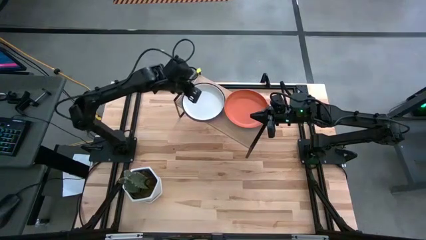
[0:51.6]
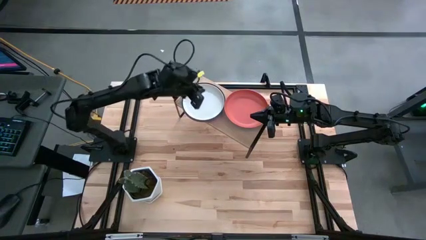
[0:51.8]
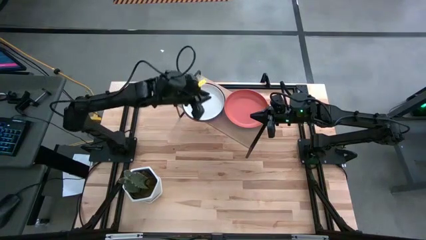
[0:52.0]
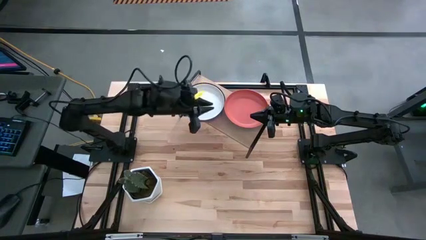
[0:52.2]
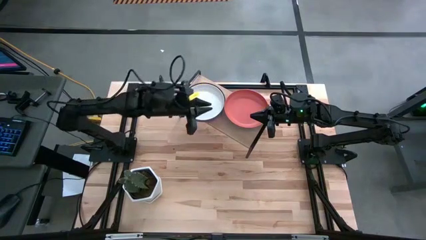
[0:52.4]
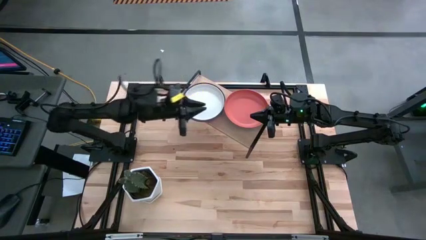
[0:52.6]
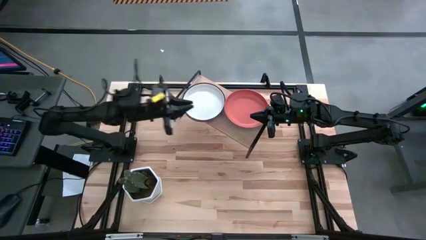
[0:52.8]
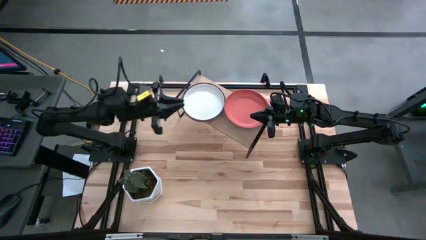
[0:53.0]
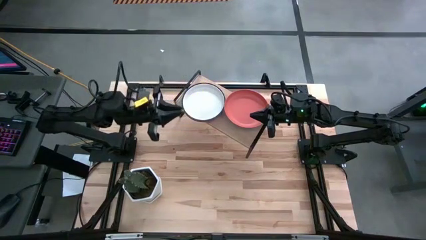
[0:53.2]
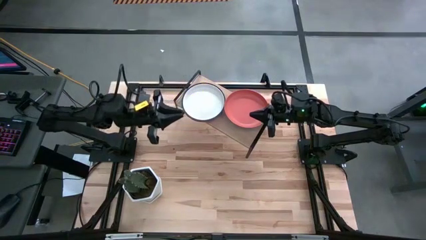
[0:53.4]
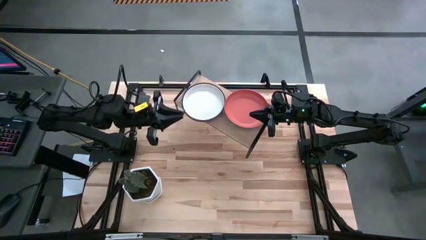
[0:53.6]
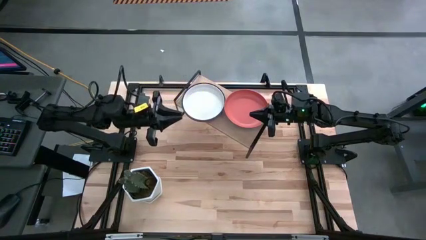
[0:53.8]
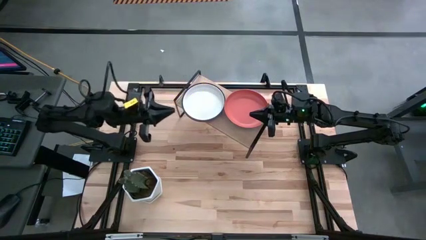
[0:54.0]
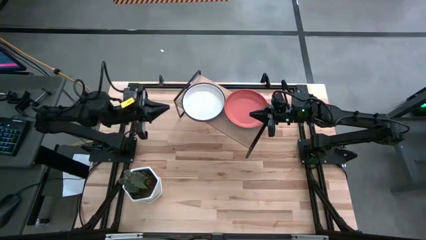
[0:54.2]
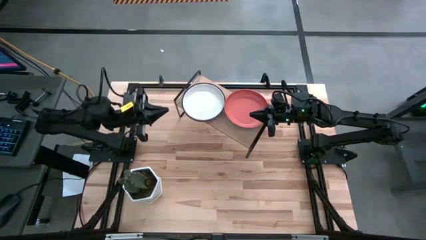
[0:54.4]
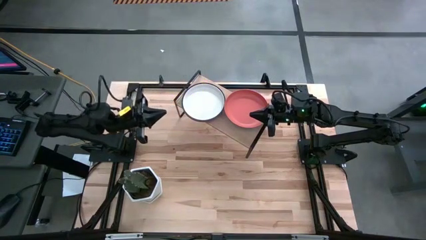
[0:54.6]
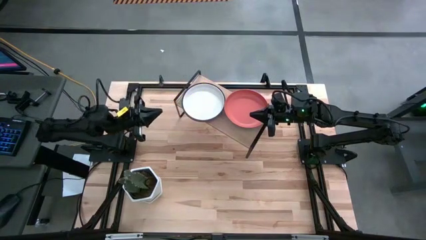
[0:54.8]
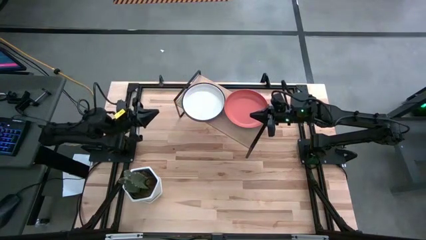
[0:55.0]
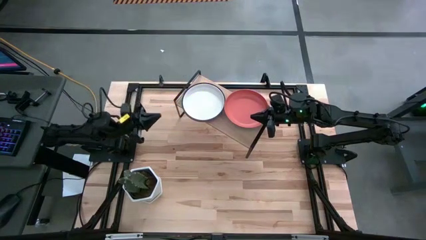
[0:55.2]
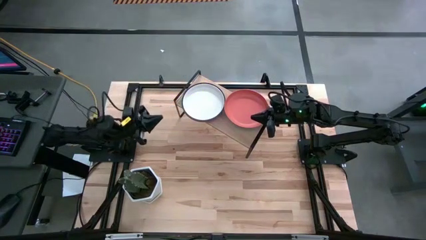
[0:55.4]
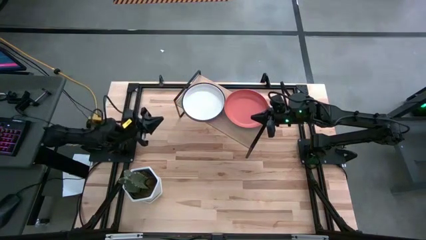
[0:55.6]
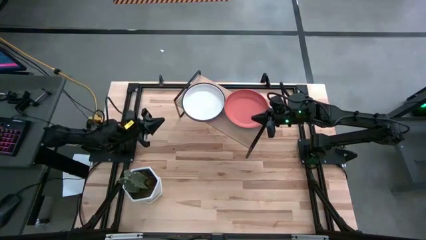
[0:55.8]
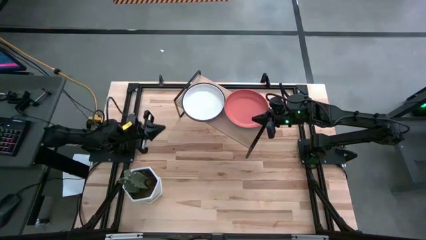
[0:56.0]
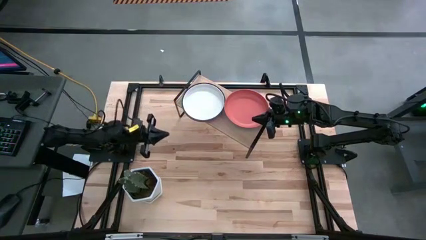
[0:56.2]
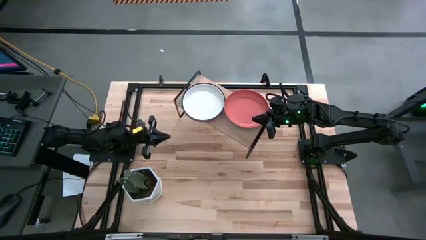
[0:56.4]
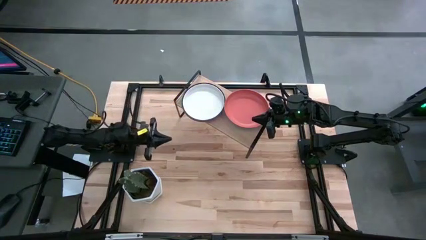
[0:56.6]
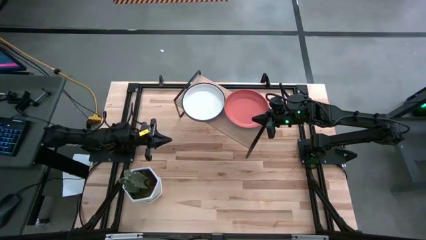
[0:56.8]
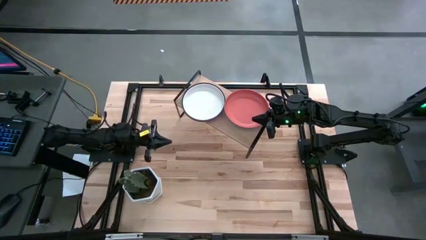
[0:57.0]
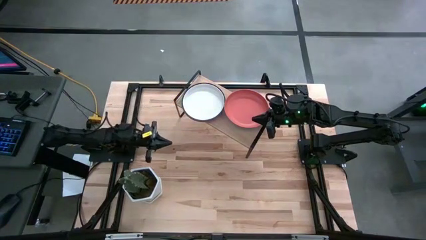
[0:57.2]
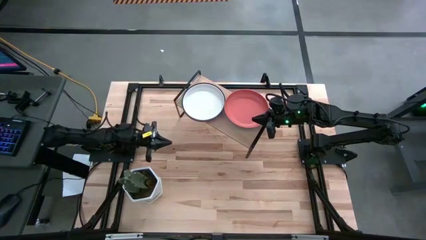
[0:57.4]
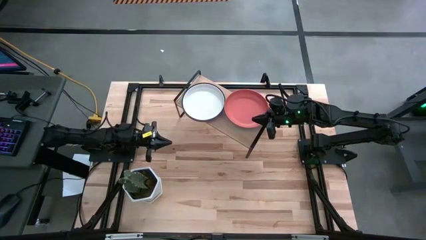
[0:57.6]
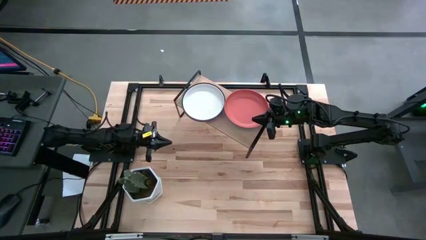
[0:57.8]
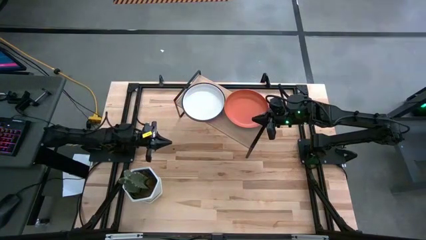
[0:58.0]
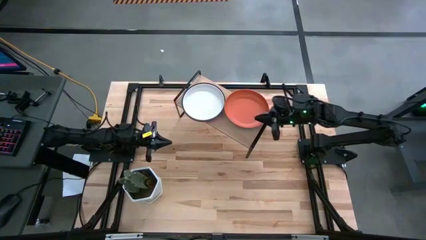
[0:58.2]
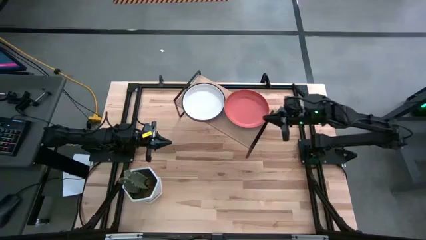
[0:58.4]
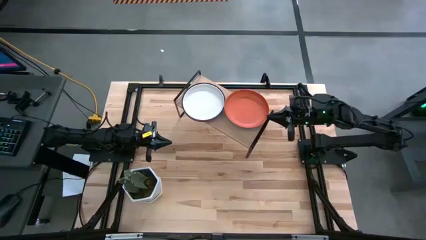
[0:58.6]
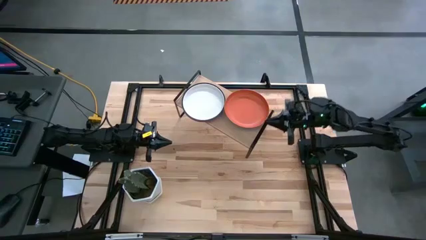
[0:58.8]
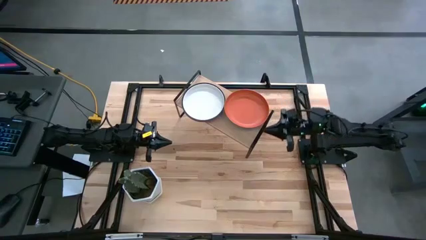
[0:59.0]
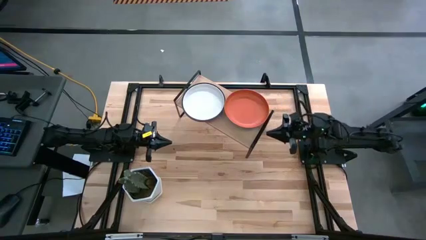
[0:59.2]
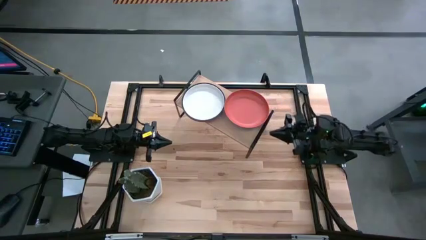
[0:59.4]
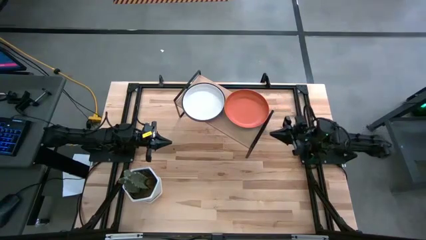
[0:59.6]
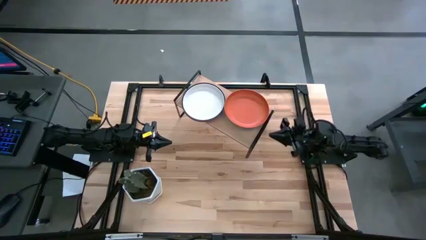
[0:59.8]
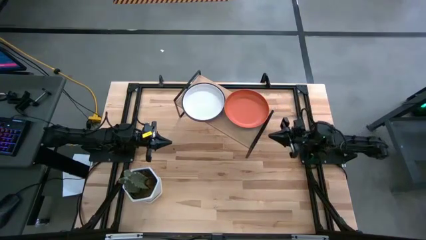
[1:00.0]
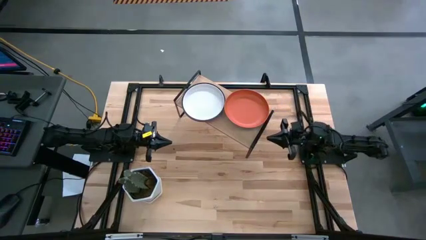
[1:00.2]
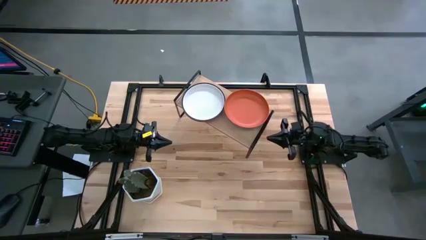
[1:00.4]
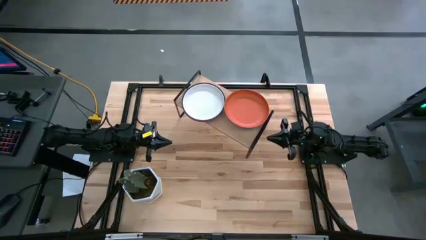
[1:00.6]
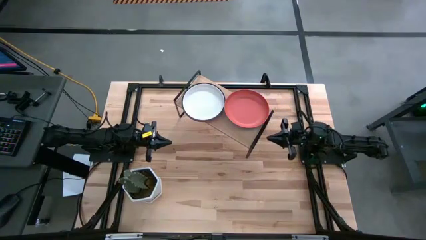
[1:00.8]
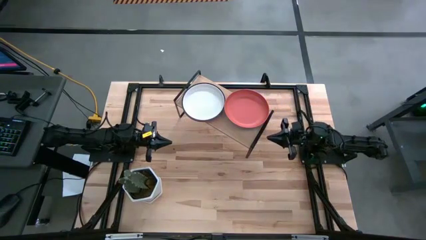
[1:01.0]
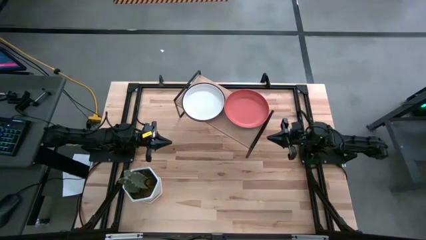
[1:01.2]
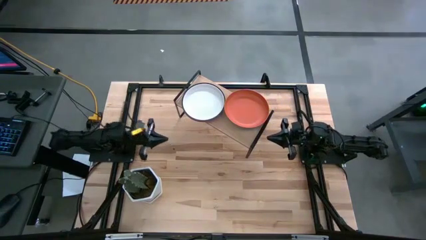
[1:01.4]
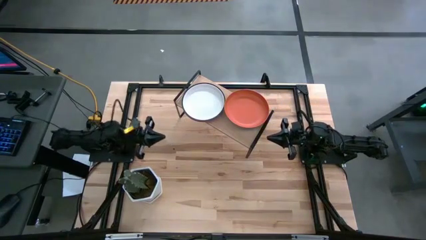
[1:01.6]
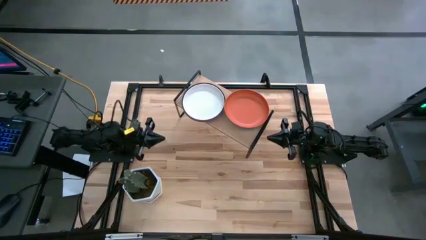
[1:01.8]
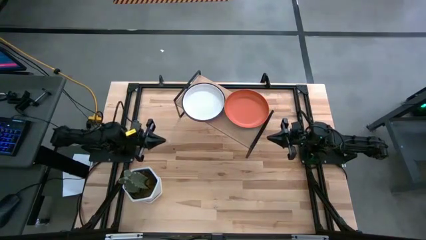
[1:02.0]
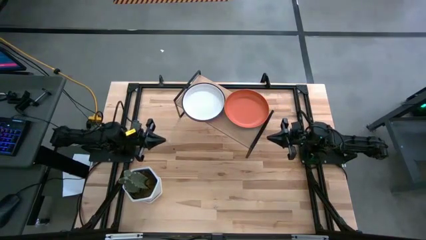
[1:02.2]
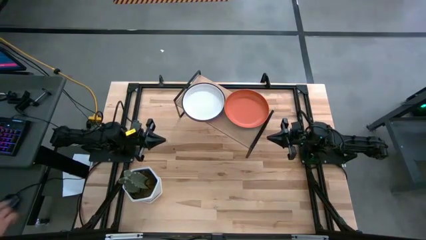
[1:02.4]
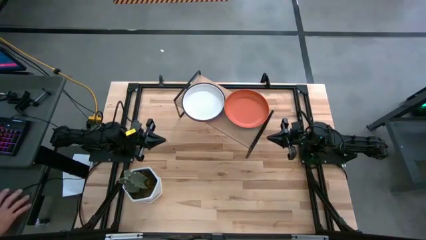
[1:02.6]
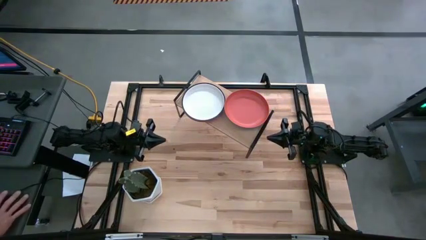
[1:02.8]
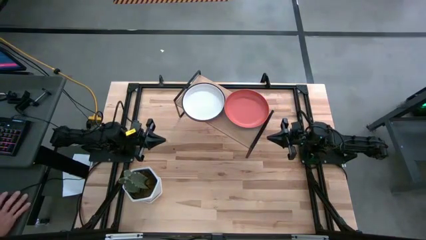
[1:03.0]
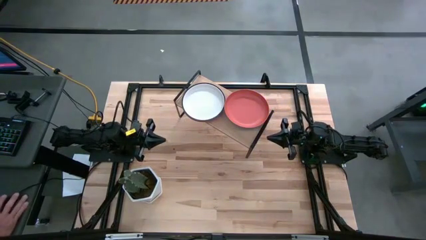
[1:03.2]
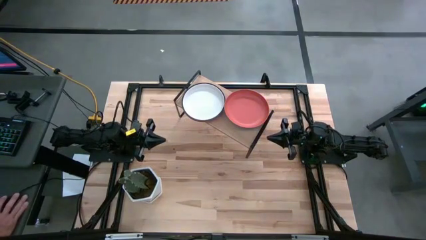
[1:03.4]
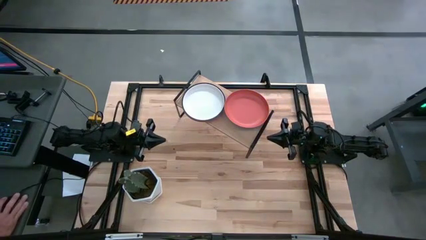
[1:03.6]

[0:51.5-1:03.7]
Task: Place and stack plates onto a shelf
Return to Home Position
